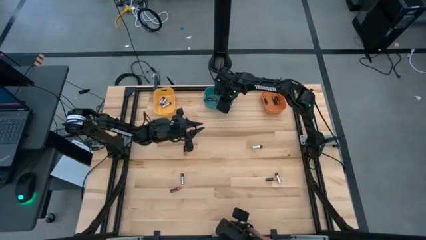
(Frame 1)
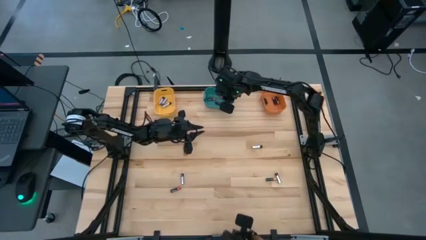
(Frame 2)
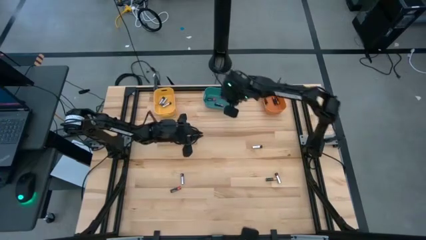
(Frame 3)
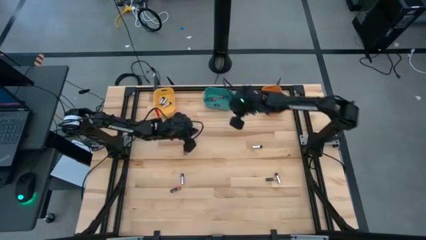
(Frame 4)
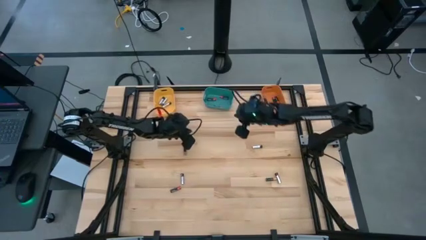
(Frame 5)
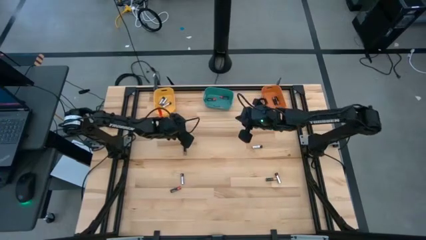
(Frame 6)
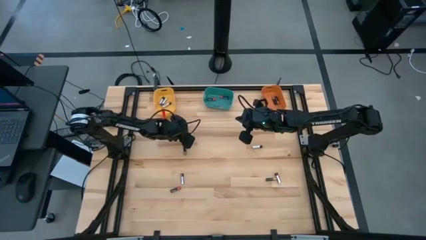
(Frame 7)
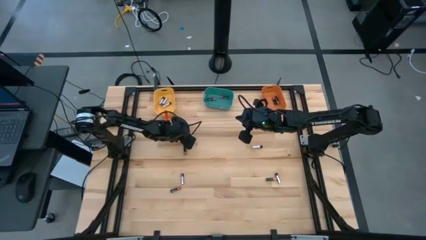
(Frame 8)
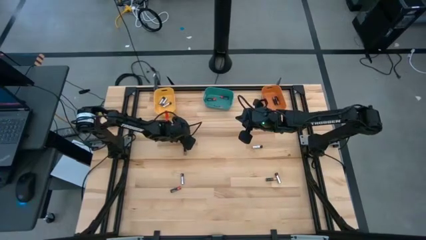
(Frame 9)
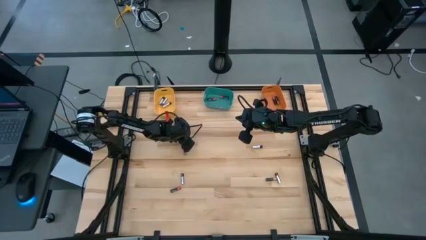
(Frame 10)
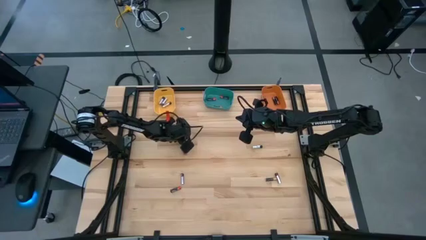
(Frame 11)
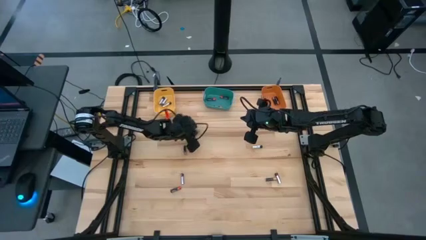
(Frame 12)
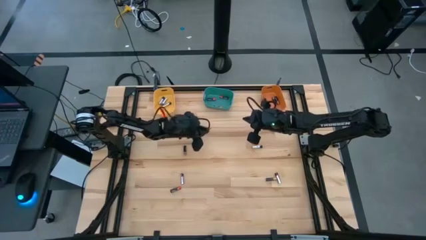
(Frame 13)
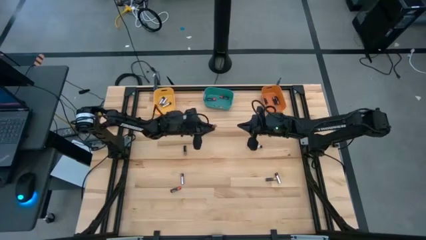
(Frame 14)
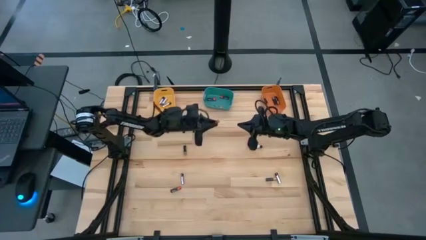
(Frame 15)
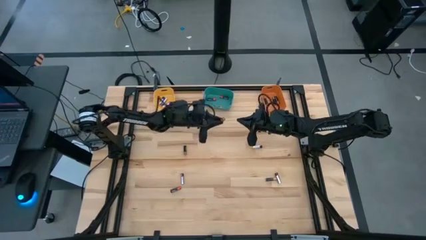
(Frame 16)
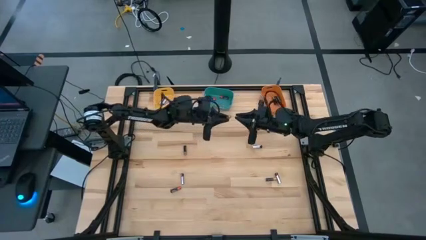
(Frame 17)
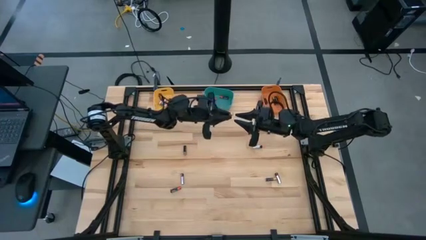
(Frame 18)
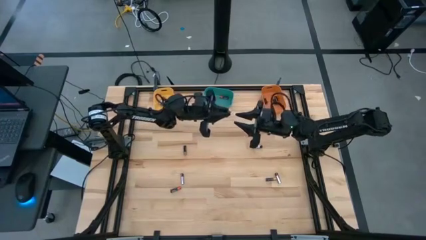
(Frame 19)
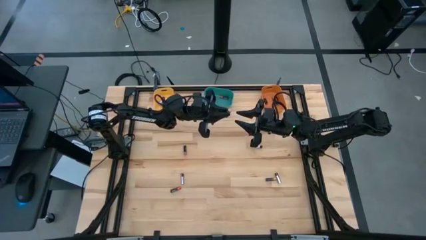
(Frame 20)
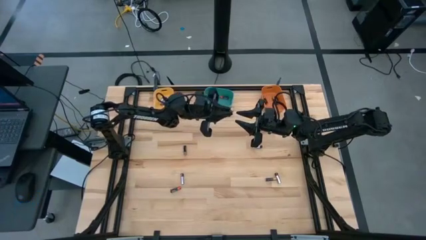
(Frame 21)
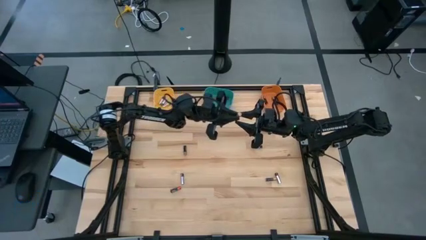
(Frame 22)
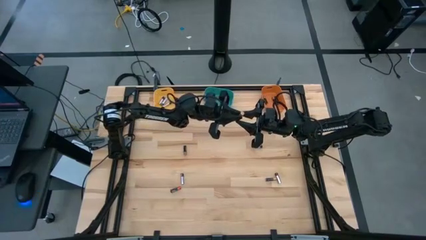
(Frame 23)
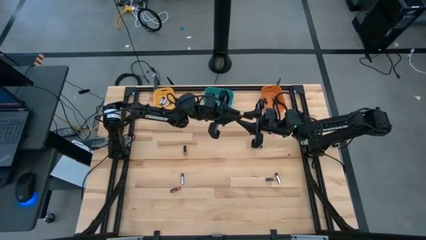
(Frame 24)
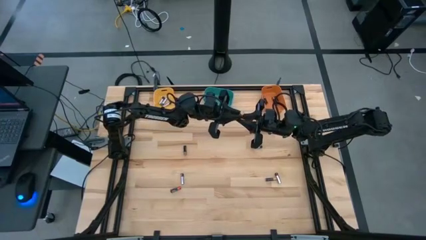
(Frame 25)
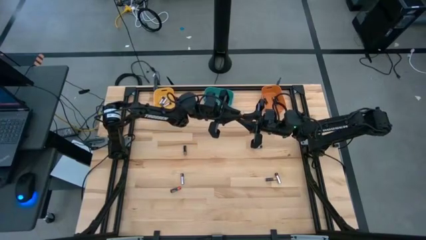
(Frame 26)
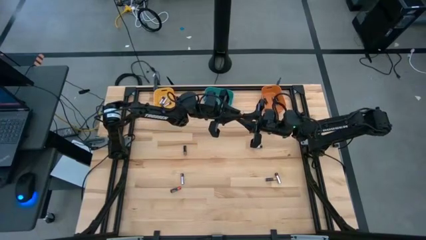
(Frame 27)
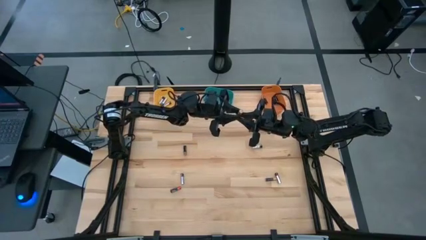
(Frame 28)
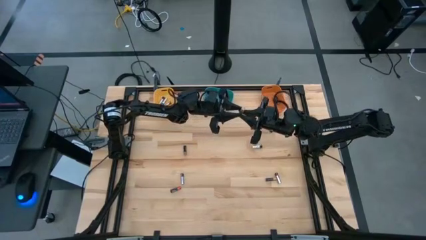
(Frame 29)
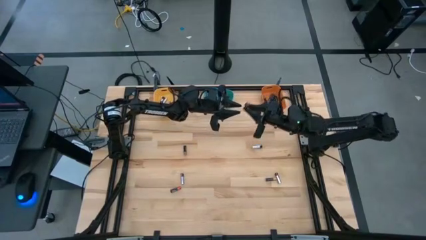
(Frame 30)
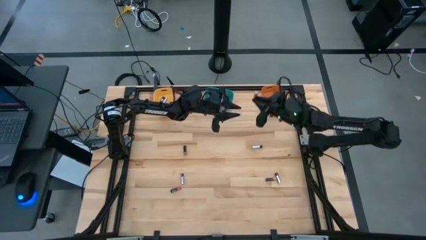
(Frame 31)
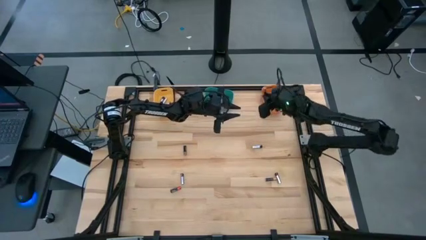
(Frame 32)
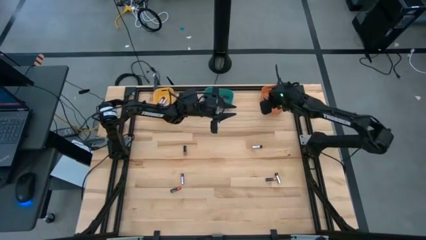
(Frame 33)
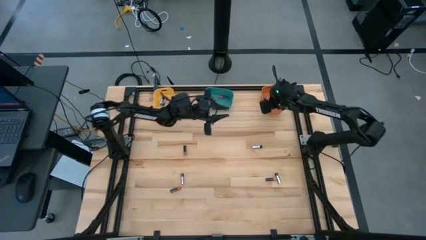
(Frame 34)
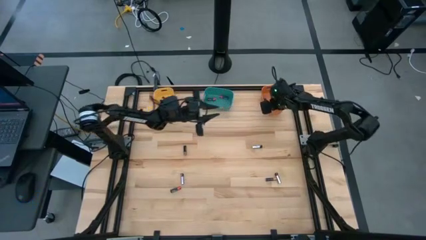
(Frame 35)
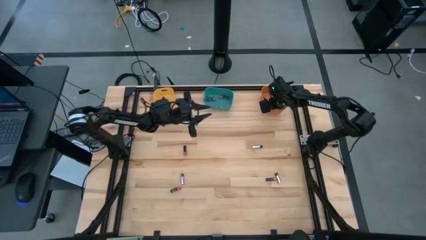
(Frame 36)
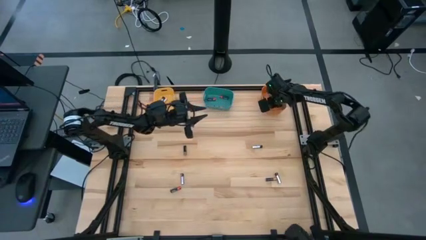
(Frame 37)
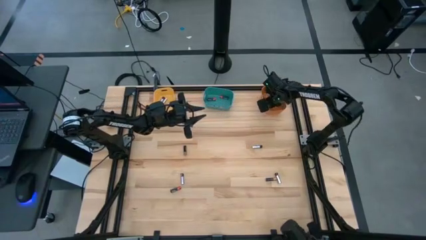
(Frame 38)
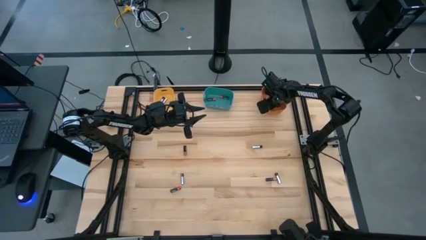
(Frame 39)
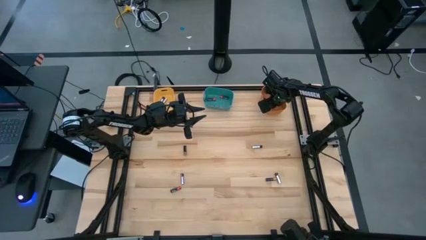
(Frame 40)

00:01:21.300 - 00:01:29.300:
Task: Sort batteries
Put the brown battery into the orange bin

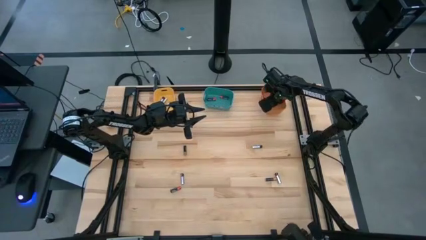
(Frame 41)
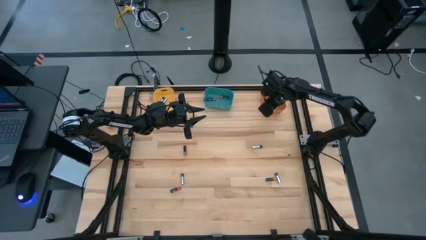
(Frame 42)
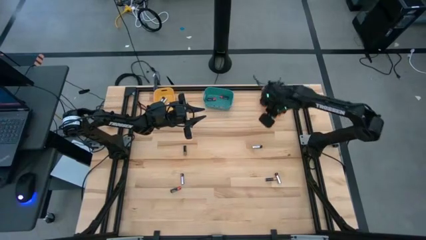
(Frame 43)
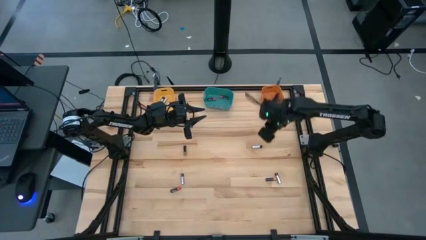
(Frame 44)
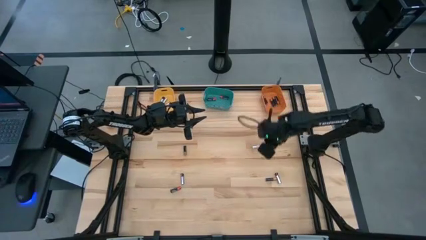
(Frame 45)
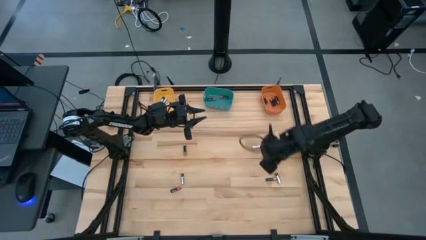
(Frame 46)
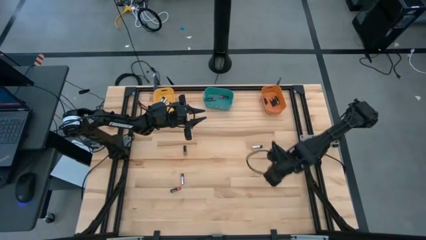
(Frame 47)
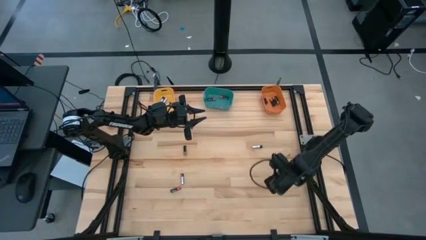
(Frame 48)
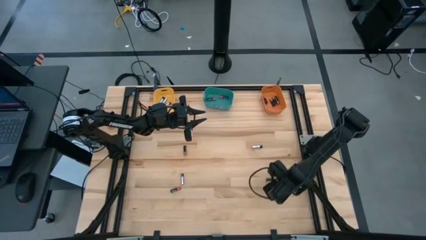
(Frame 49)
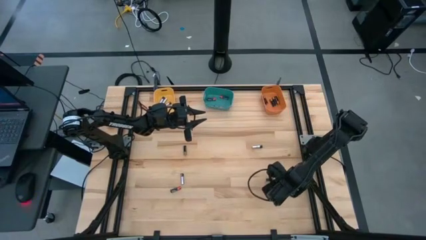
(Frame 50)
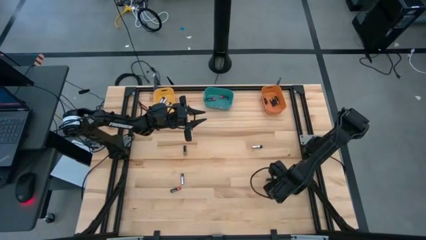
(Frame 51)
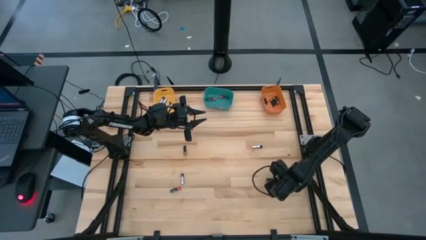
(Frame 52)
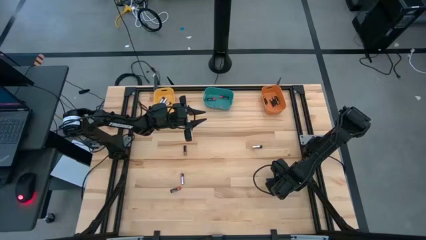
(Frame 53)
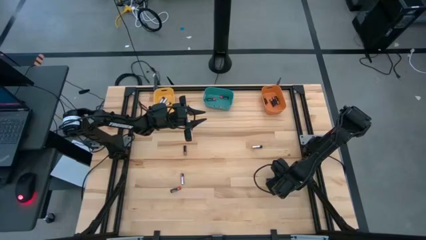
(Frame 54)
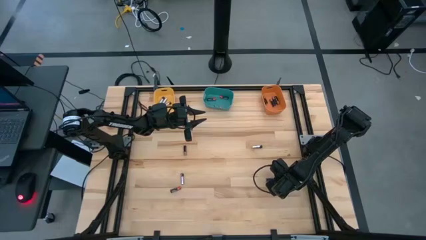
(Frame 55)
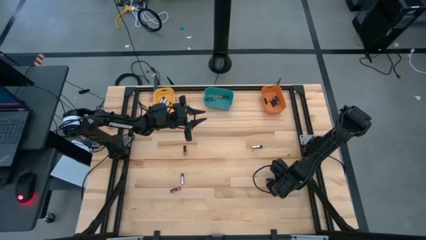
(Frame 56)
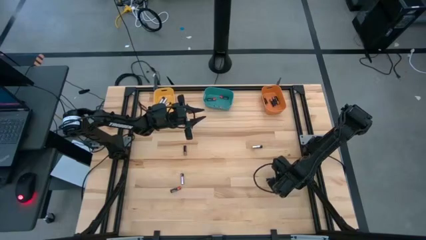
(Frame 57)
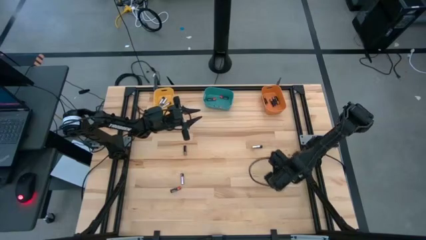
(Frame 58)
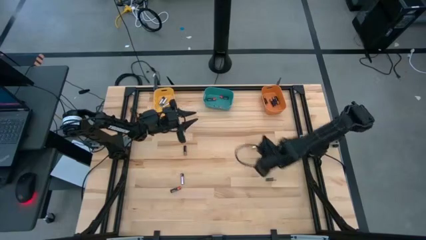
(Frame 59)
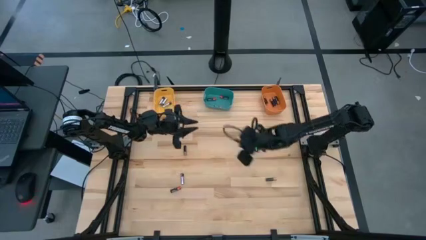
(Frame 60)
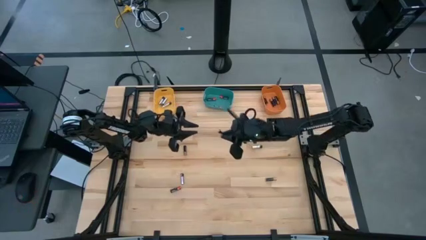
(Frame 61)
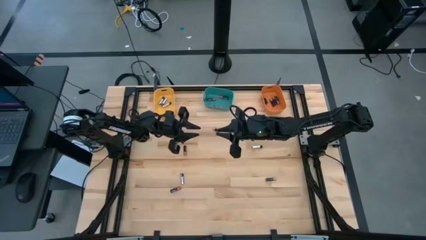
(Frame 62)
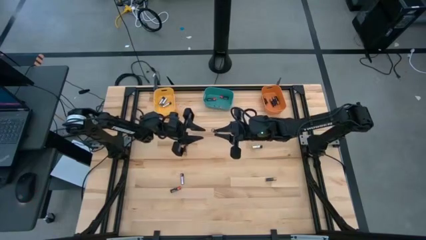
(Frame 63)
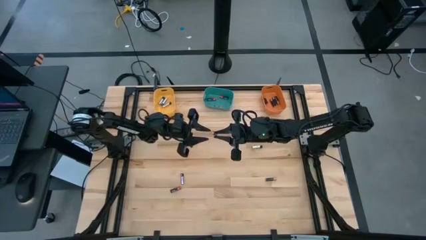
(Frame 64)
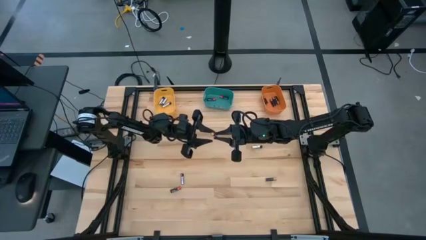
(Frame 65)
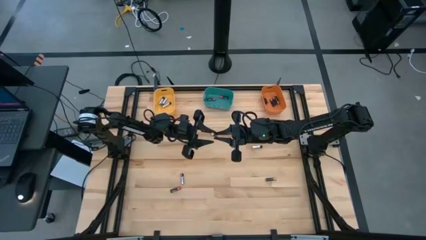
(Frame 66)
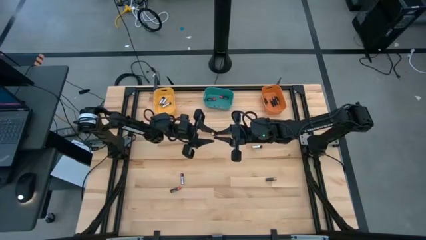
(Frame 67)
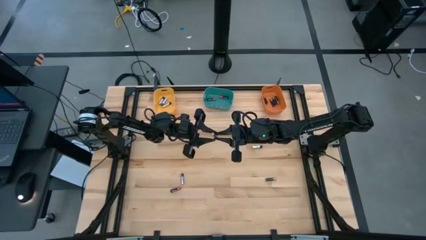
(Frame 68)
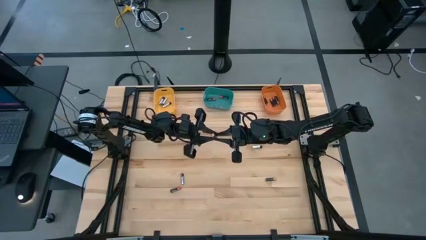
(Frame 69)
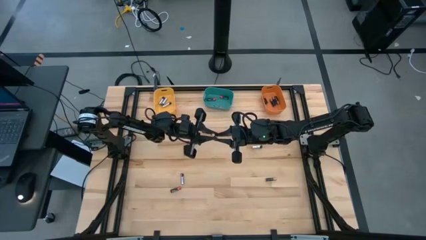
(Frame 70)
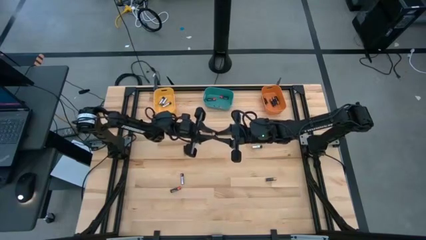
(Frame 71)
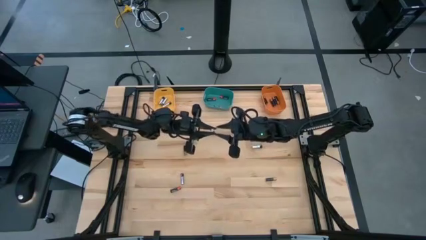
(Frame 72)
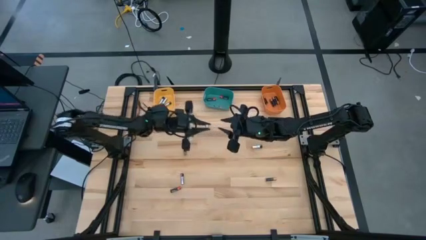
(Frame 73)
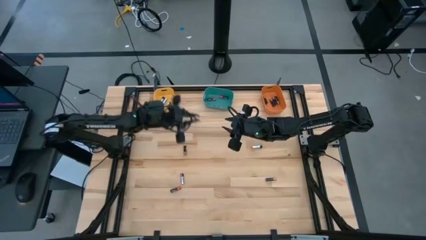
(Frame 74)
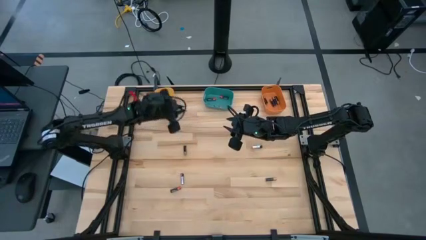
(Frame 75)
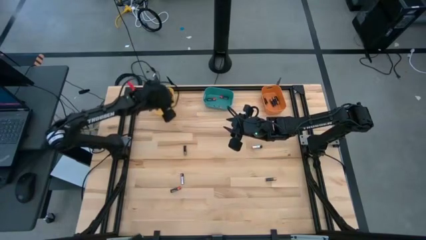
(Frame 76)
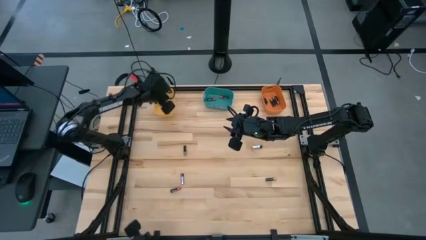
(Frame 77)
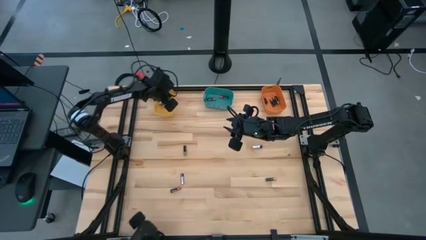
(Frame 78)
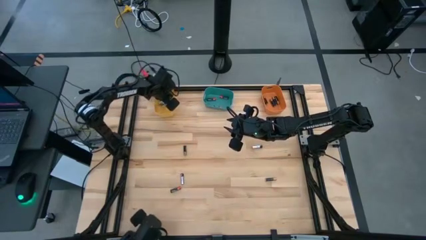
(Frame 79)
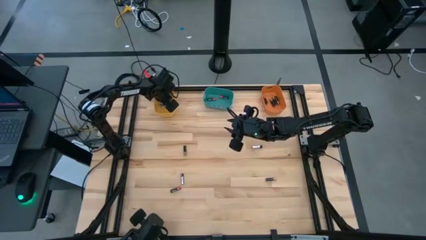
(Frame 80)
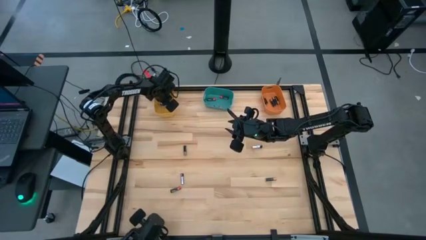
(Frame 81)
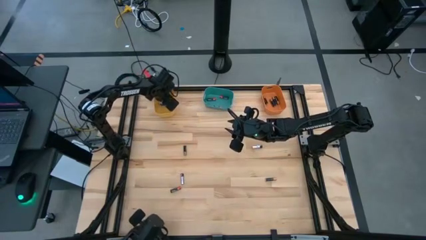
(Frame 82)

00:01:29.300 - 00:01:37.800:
Put the silver battery into the yellow bin
